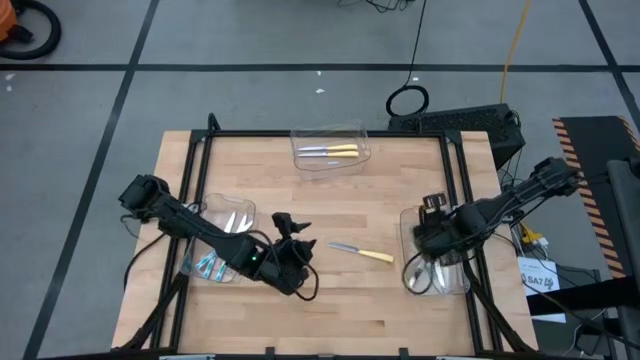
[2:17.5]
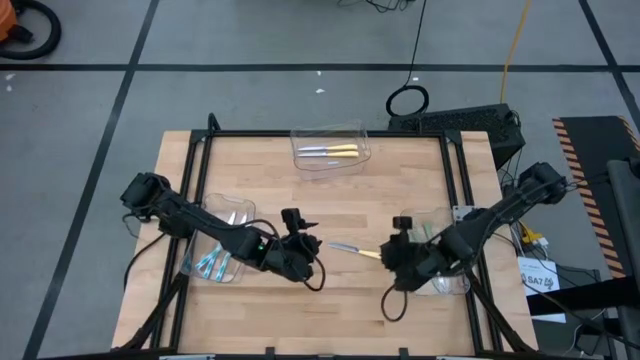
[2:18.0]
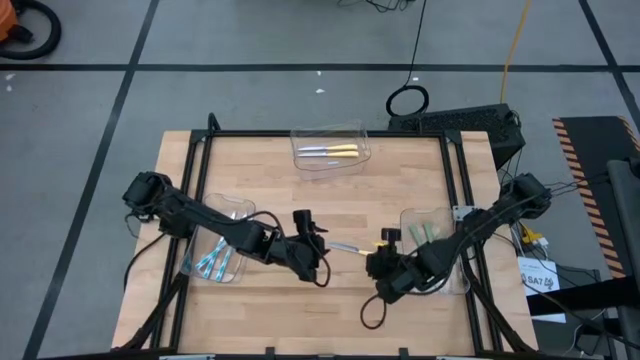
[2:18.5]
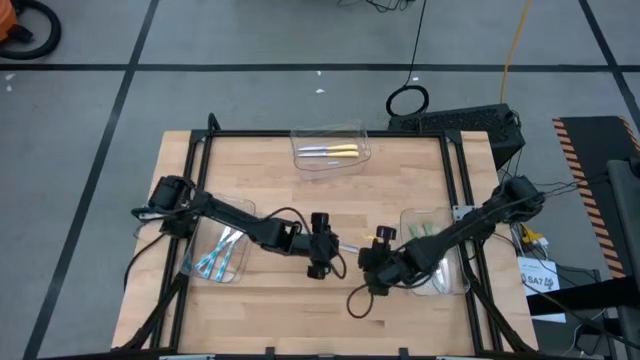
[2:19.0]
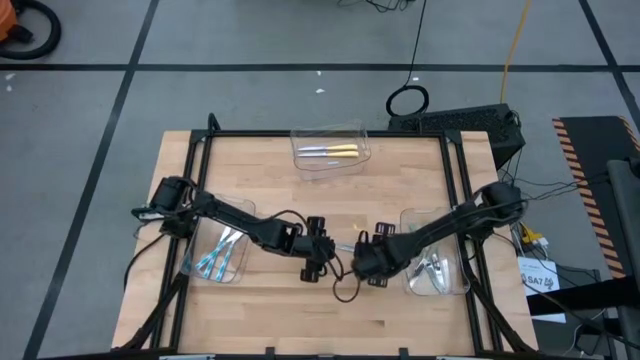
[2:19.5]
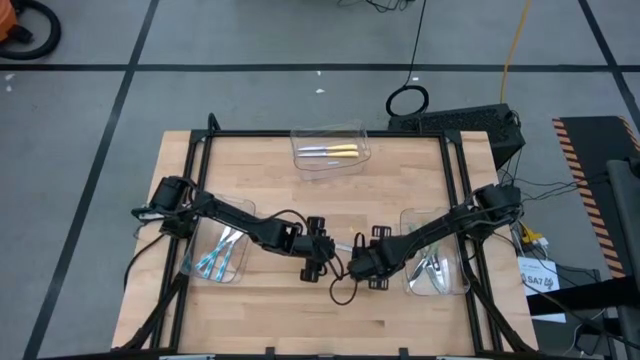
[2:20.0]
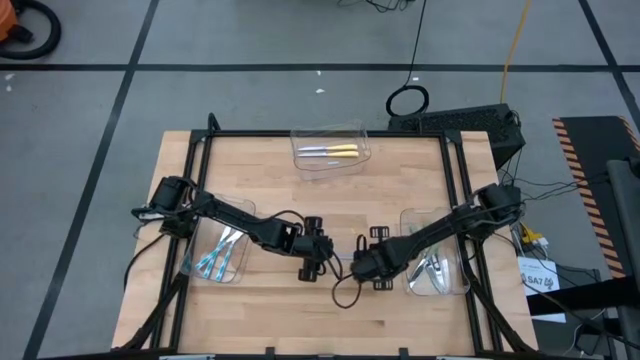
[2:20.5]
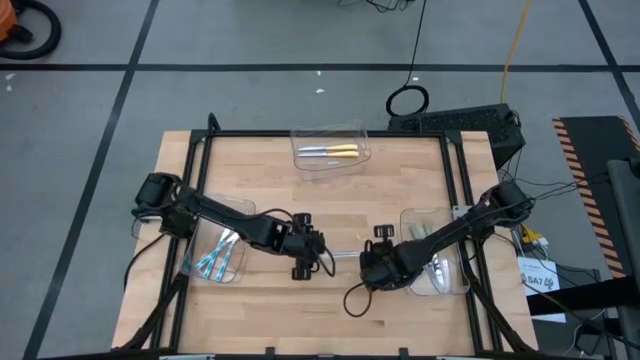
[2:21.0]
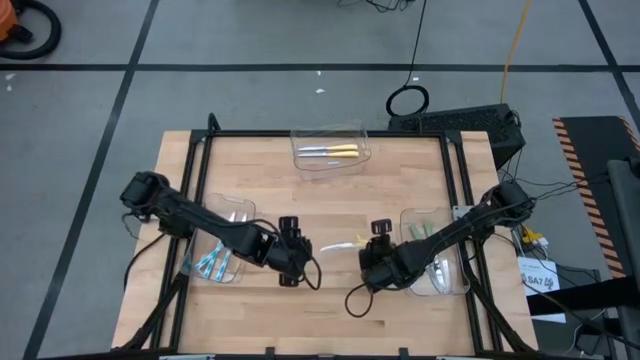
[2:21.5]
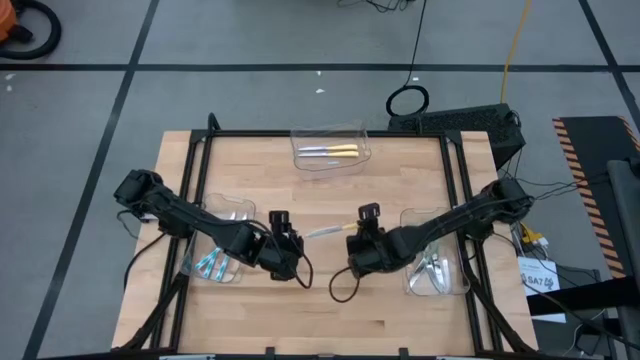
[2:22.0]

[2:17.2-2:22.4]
Task: Sort silverware by color (type)
Put the yellow knife into the top center transparent bin

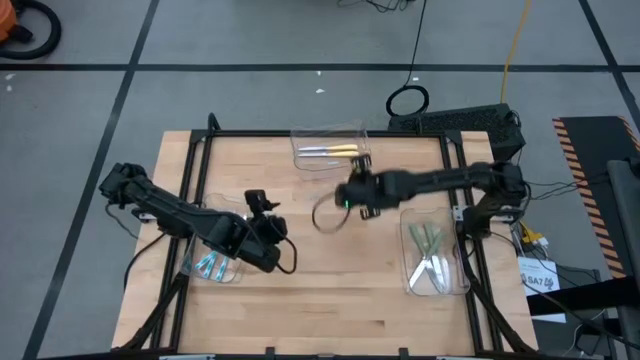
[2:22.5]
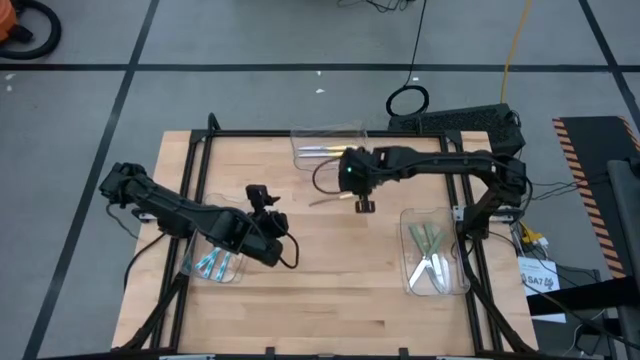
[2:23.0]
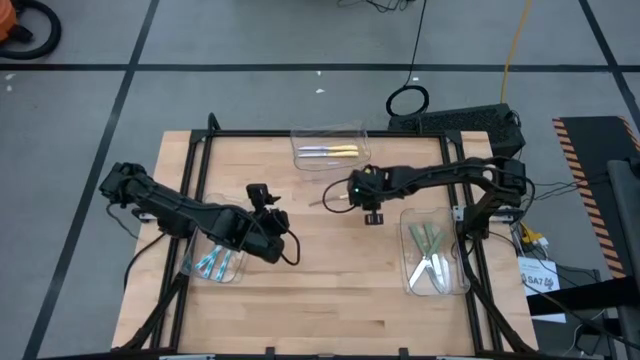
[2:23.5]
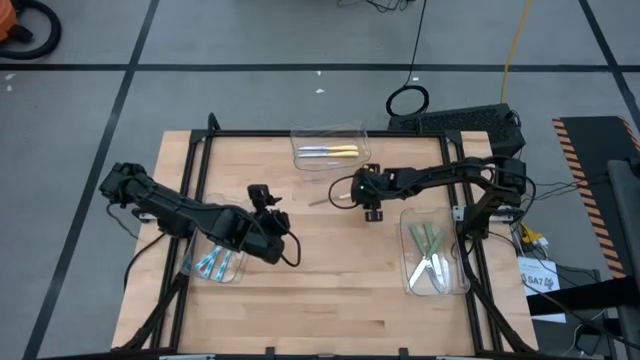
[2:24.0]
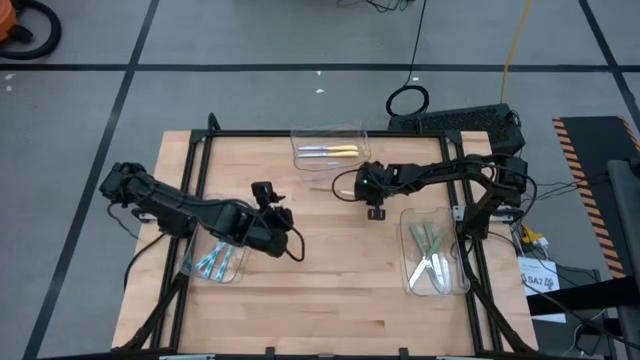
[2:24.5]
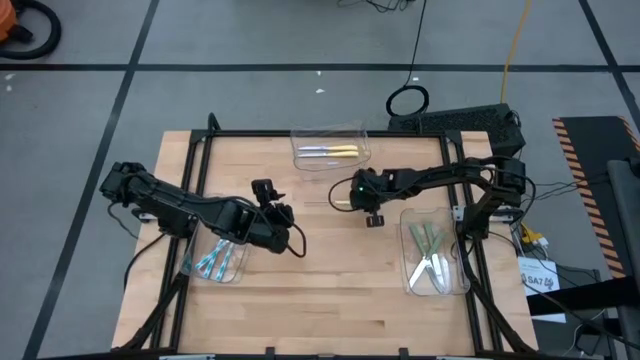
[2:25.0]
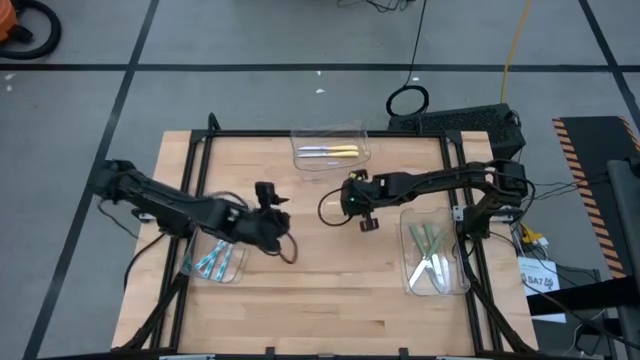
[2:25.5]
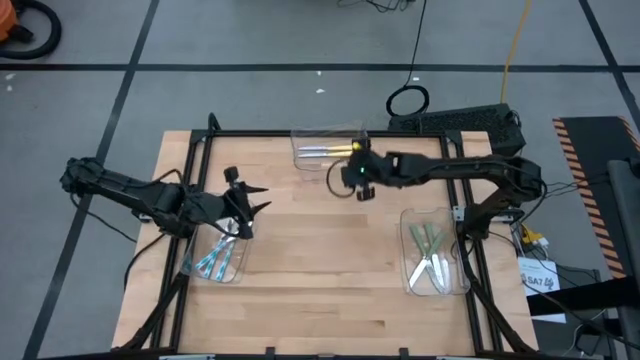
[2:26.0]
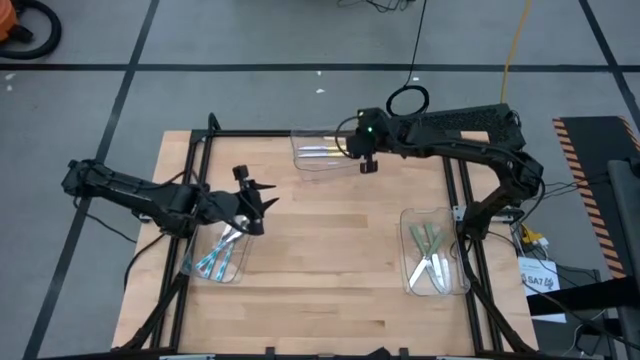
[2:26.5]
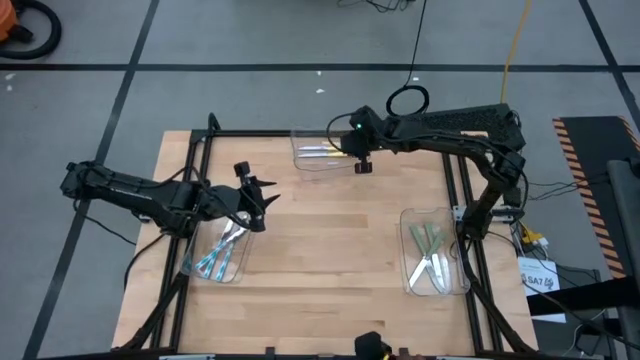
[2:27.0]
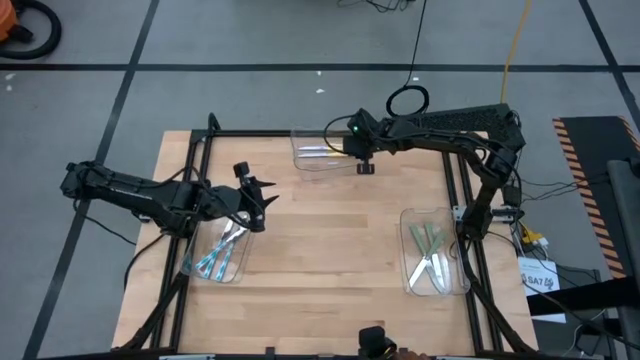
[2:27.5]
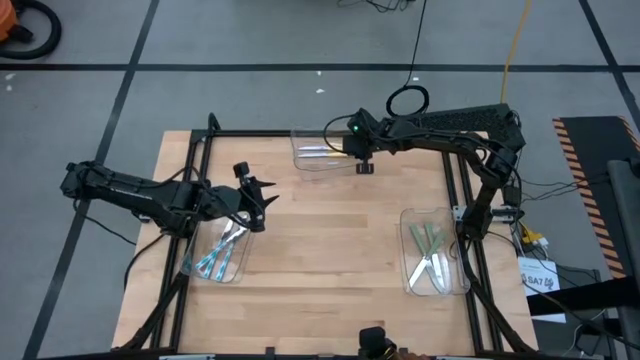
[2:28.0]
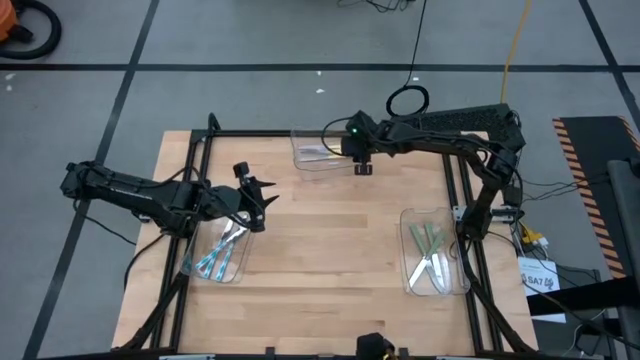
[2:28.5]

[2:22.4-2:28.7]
Put the yellow knife into the top center transparent bin

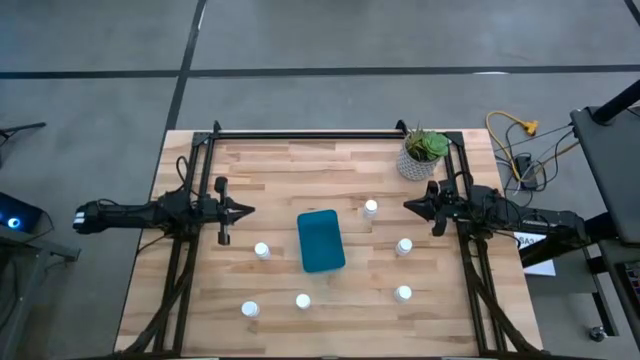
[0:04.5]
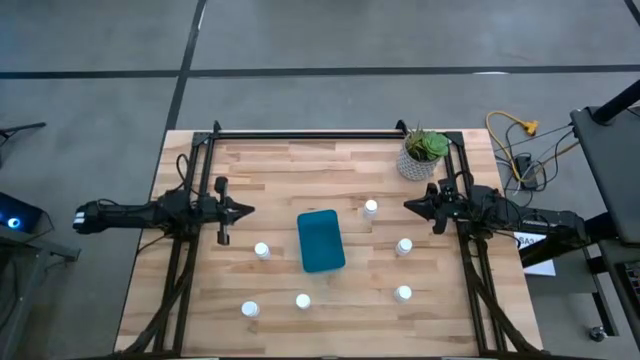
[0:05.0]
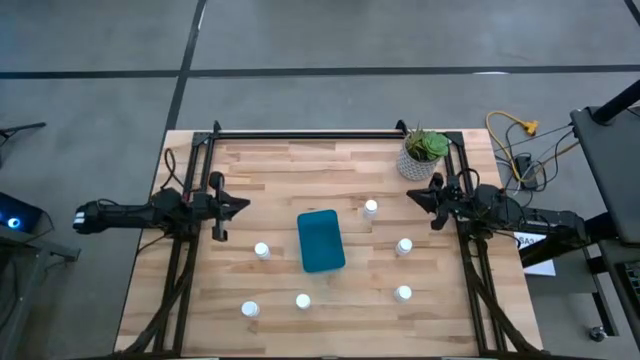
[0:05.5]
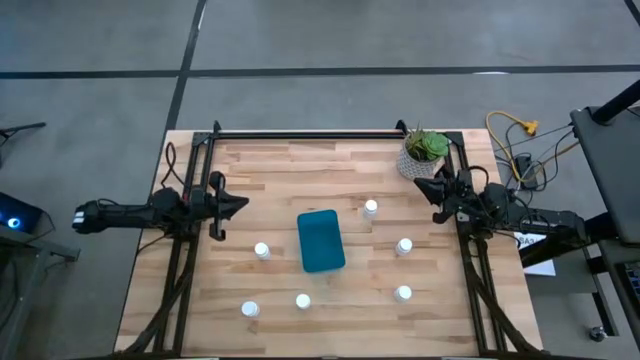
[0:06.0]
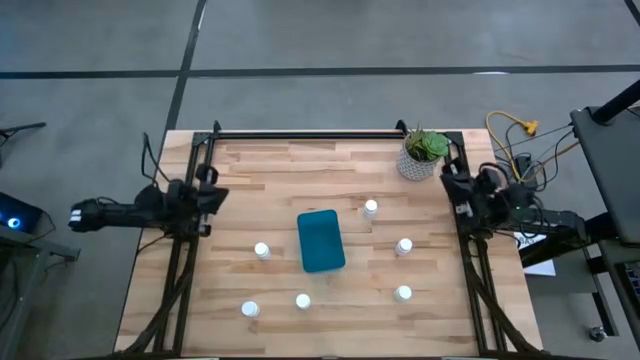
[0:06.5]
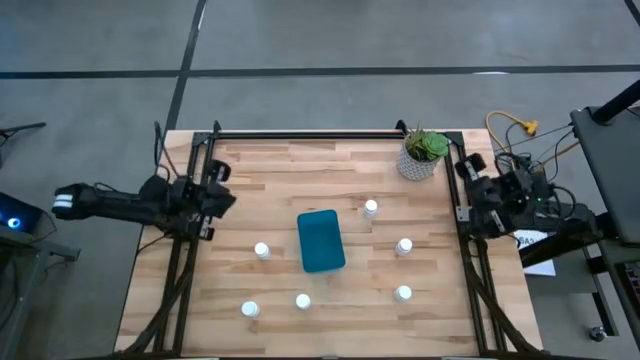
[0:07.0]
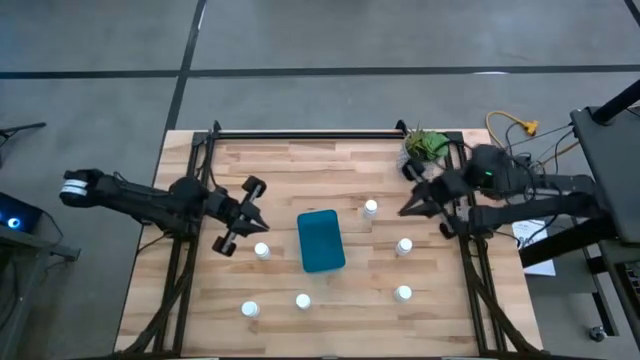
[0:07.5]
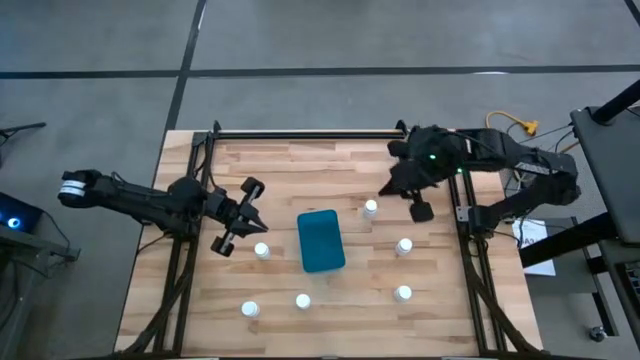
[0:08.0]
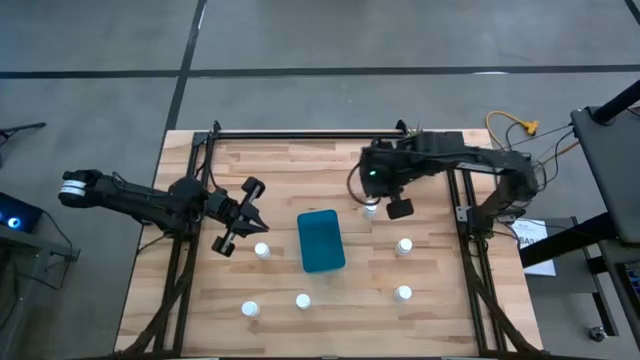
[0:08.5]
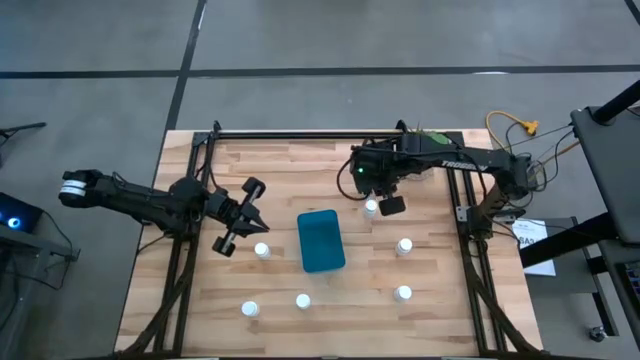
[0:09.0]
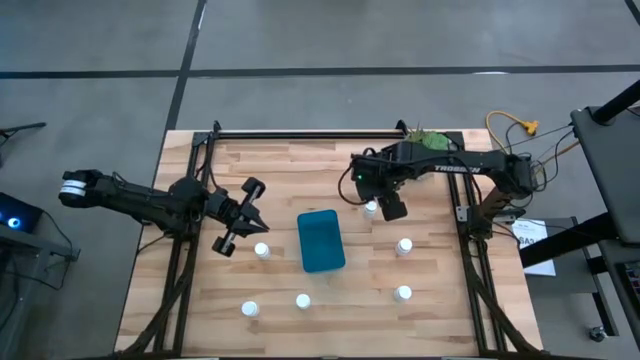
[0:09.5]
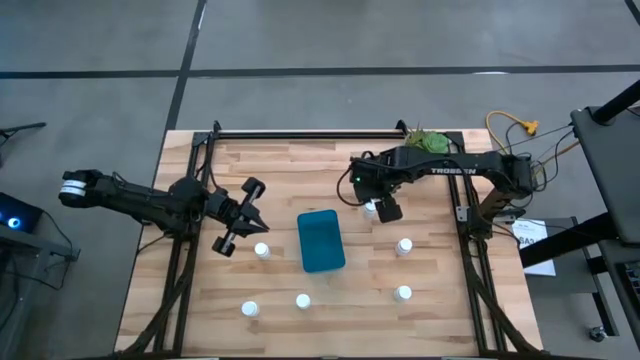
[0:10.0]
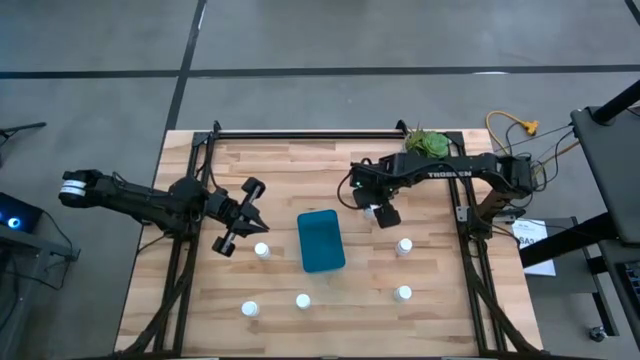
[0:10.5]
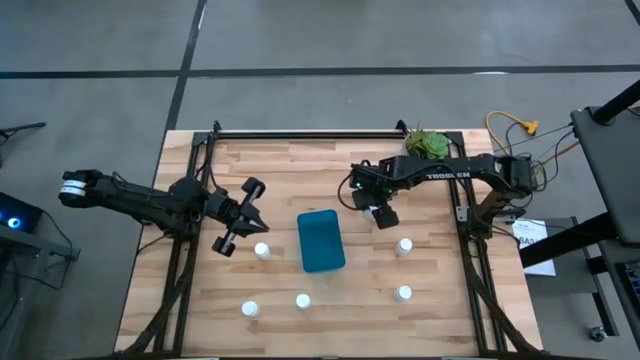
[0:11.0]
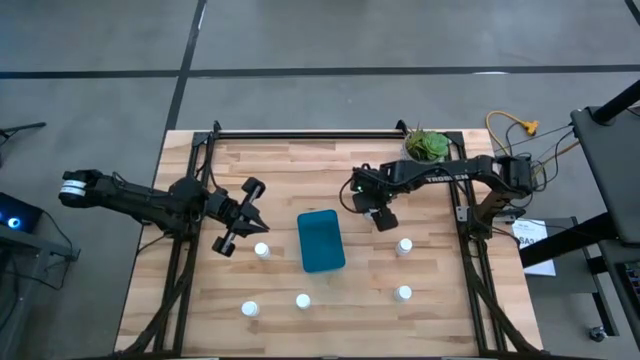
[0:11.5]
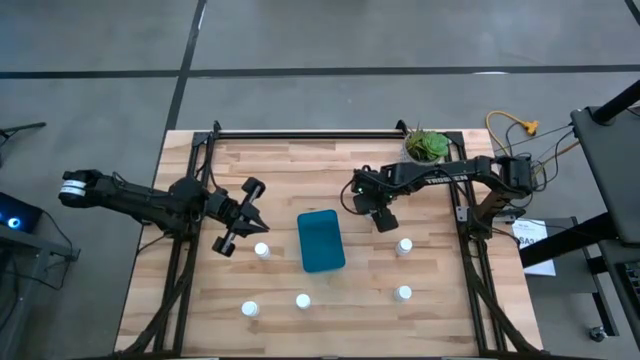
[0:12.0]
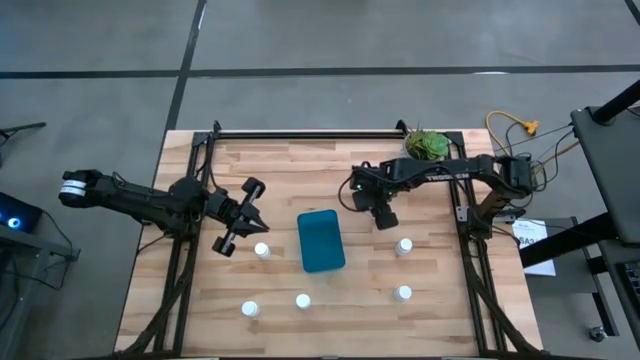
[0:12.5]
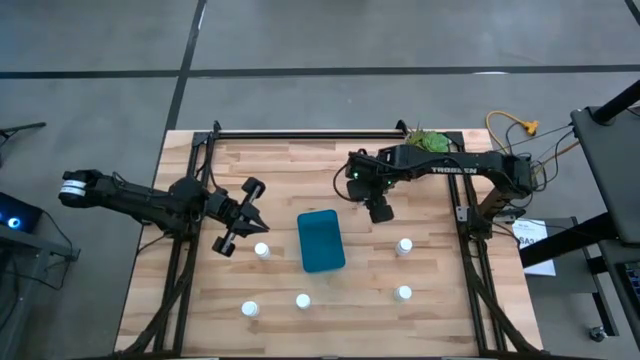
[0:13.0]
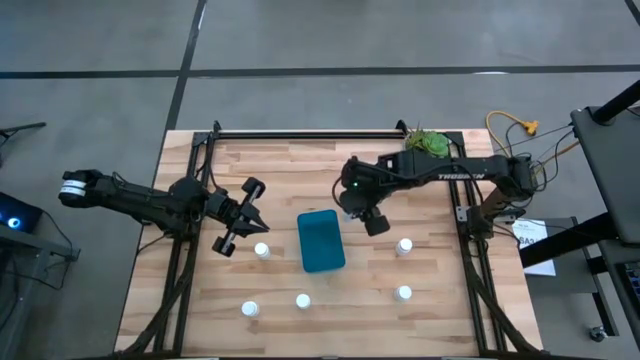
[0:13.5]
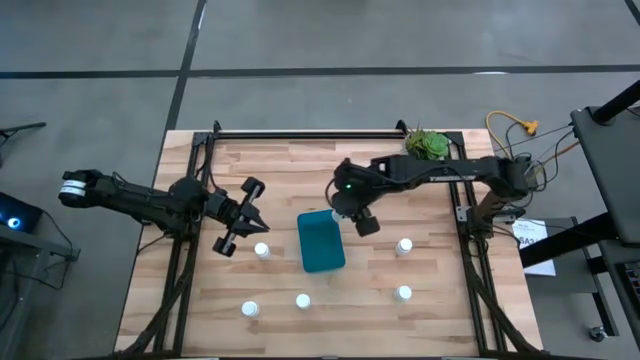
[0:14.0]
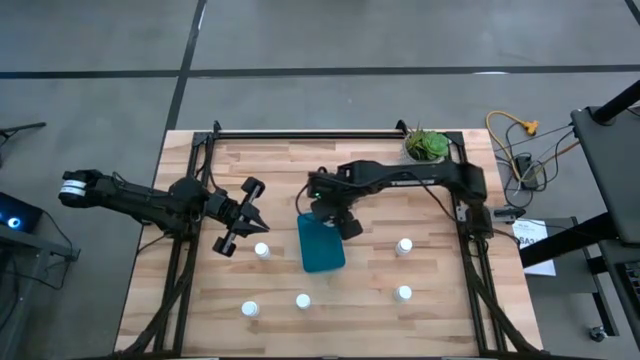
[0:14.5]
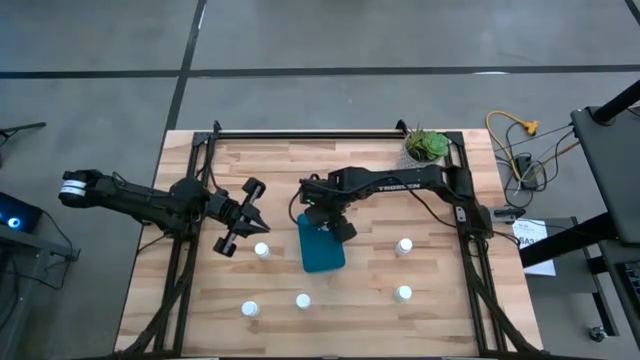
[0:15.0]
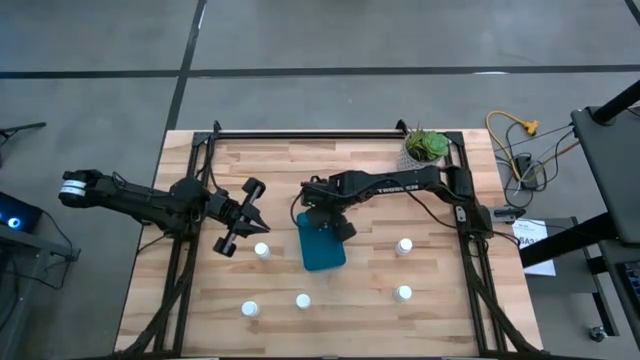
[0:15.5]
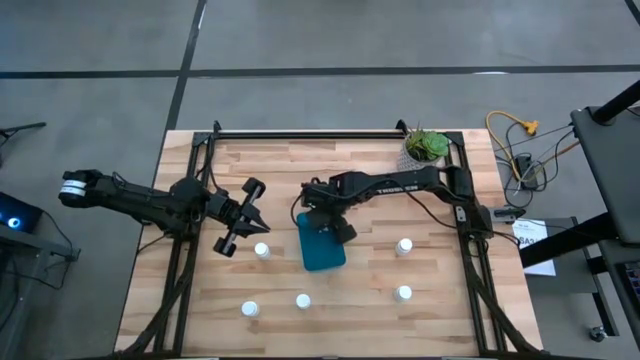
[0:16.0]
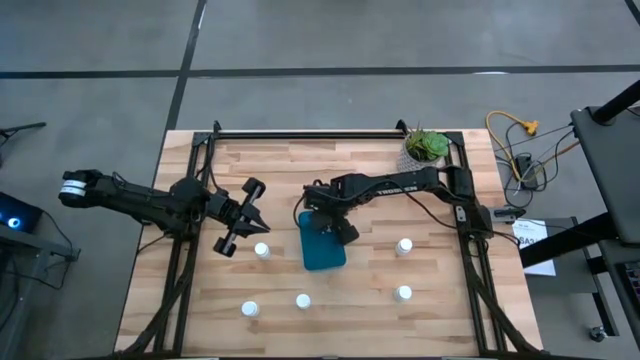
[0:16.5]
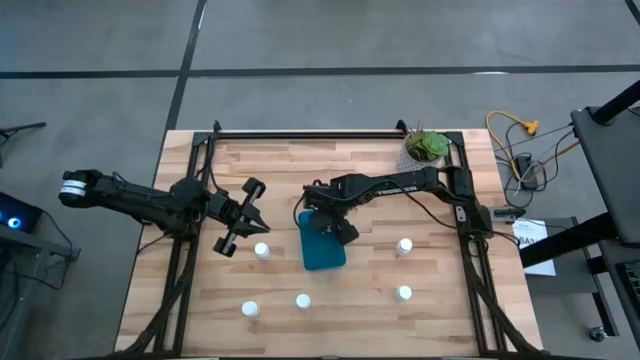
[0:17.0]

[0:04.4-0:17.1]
Task: Pick and place pill bottles into a basket
Put the white pill bottle into the blue bin
